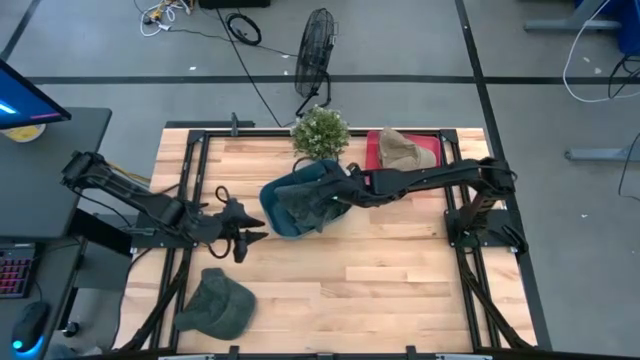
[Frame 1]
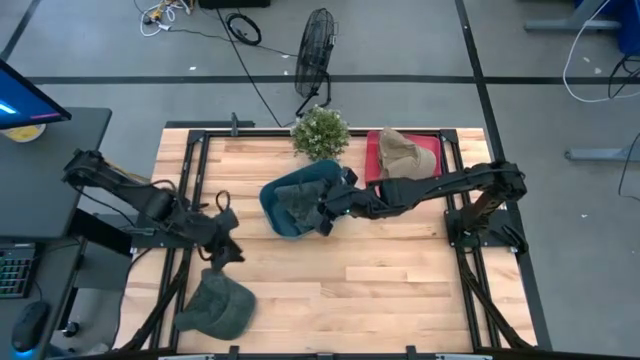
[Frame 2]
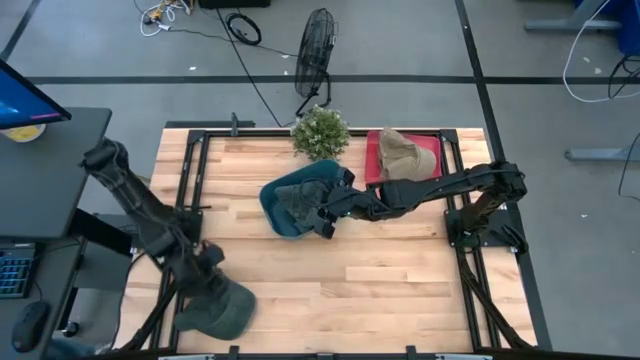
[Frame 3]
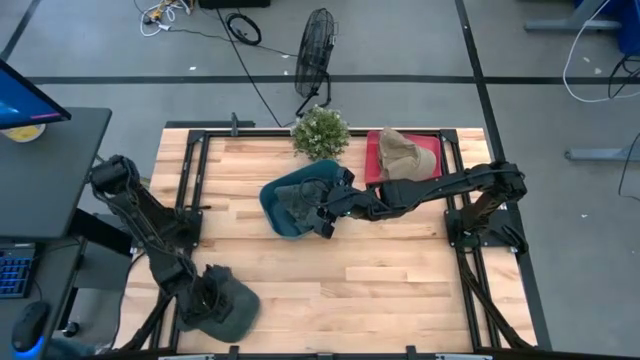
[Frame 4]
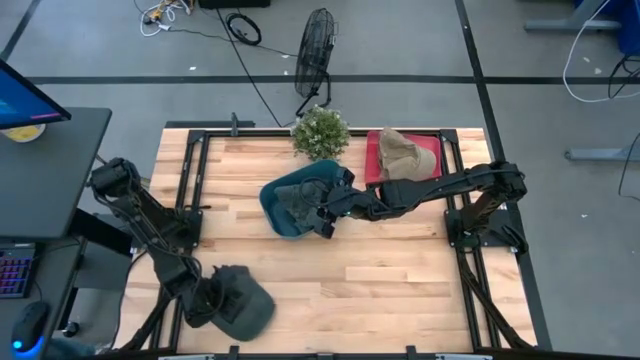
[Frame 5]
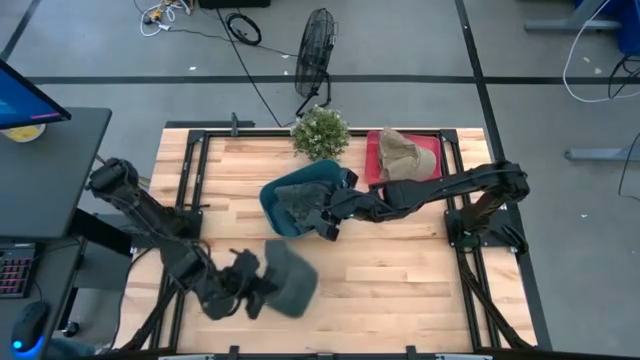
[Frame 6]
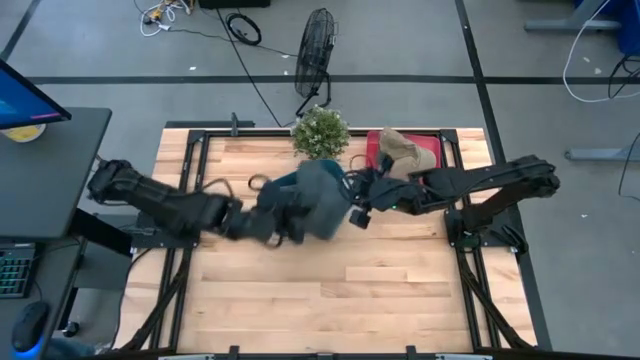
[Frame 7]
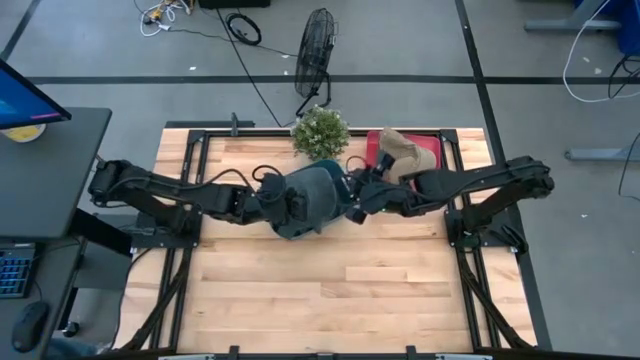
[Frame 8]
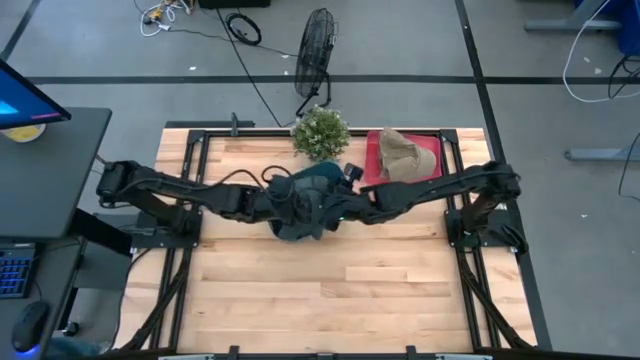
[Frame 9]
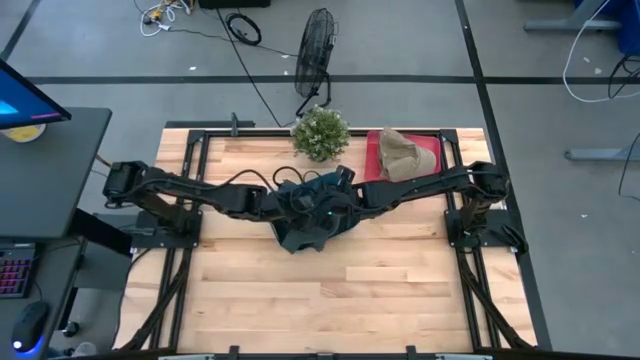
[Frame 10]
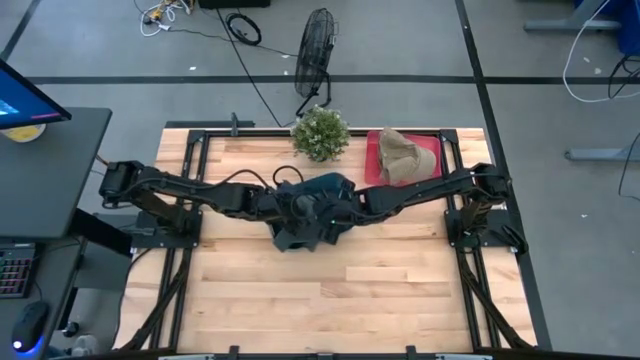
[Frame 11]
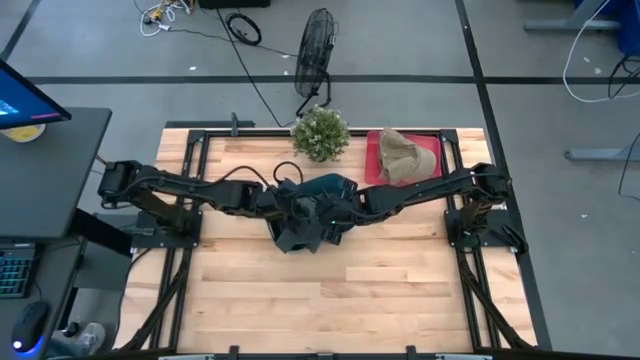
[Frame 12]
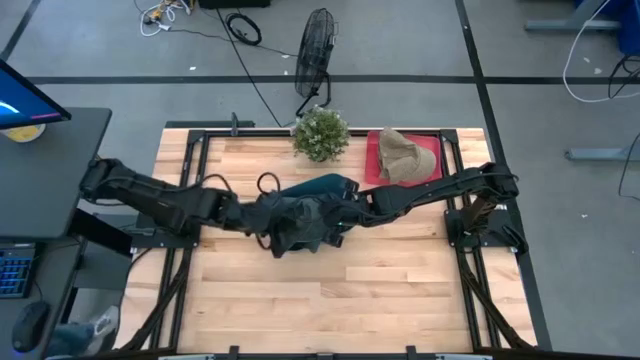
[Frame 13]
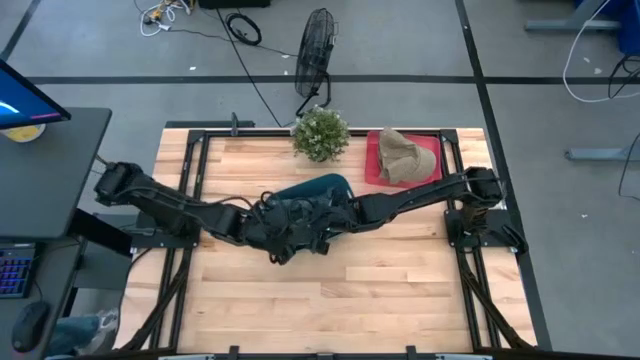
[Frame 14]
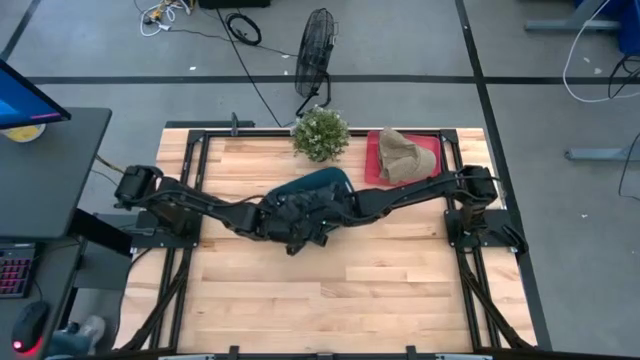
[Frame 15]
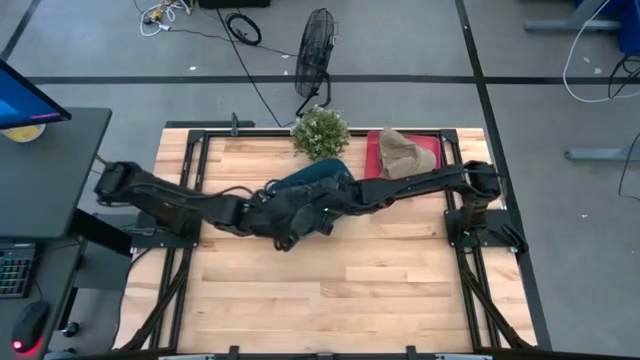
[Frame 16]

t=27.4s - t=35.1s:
Task: Pick & Place hat
Put the black cap into the blue bin

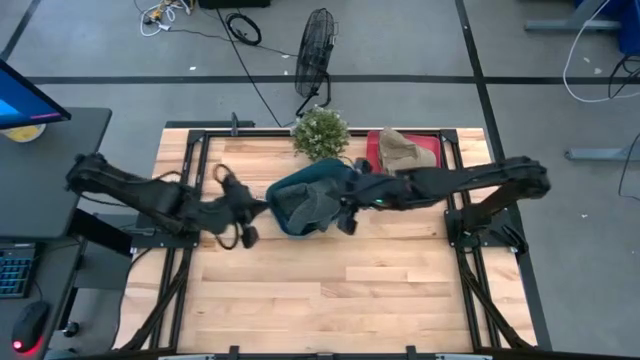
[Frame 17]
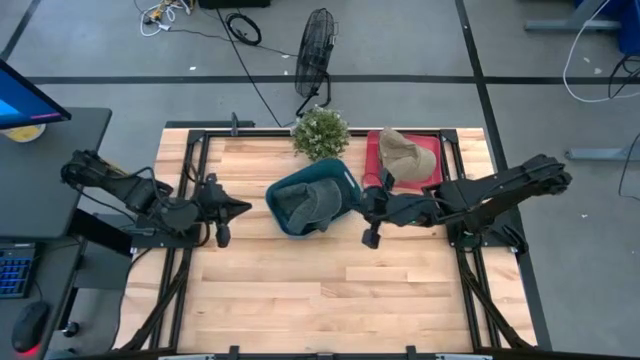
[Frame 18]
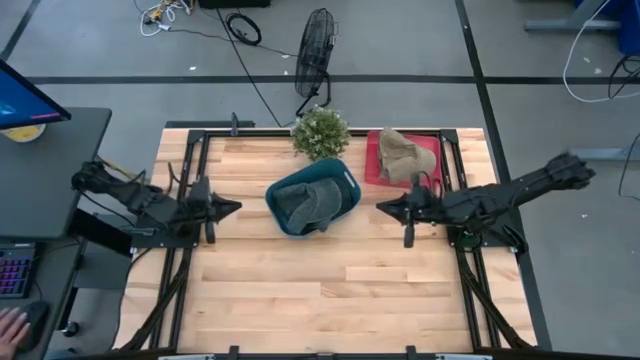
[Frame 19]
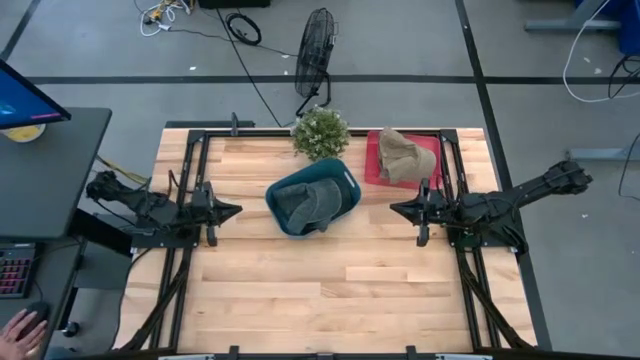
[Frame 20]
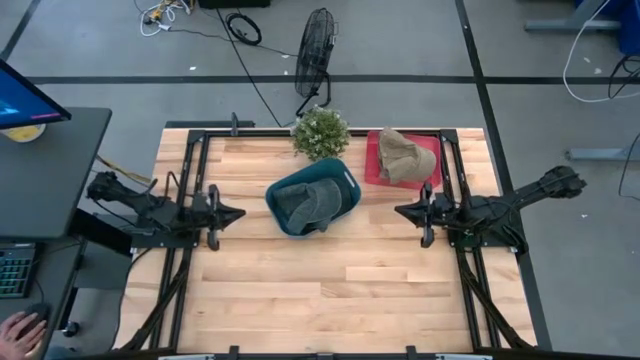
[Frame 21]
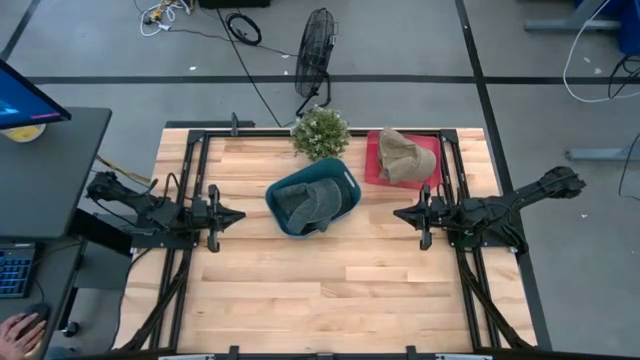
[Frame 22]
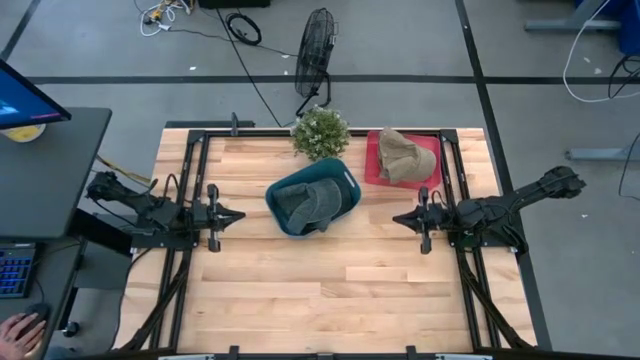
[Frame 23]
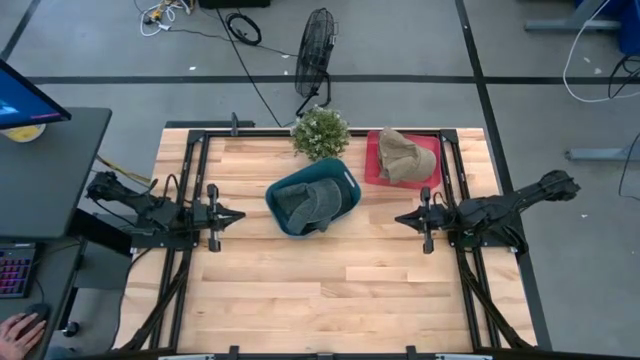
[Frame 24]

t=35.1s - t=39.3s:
Return to Home Position

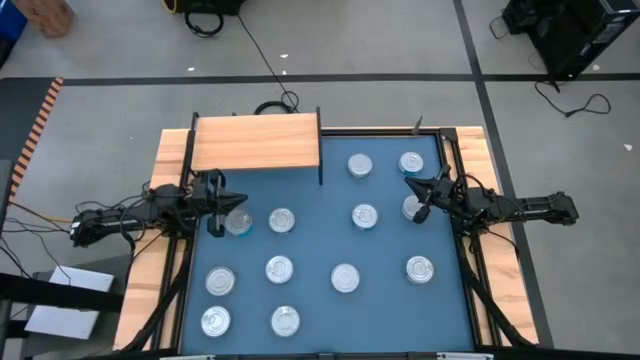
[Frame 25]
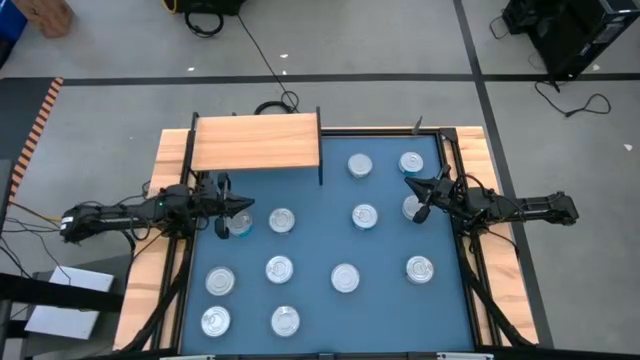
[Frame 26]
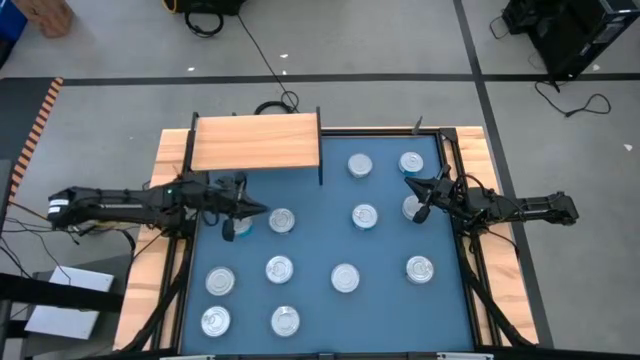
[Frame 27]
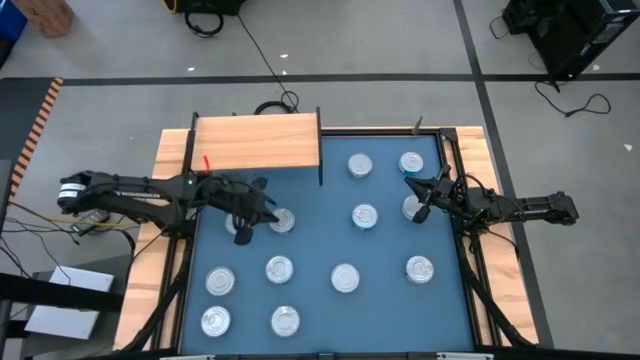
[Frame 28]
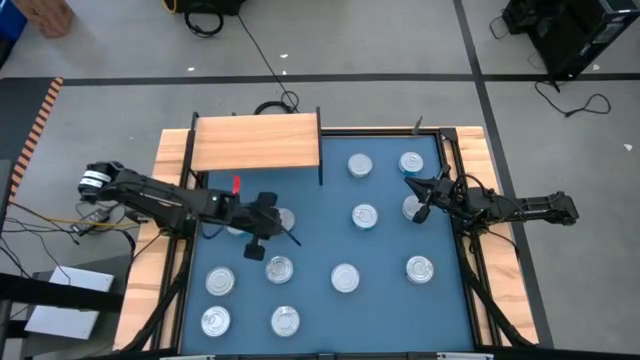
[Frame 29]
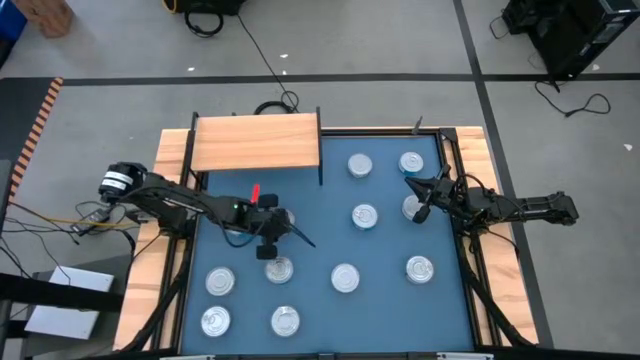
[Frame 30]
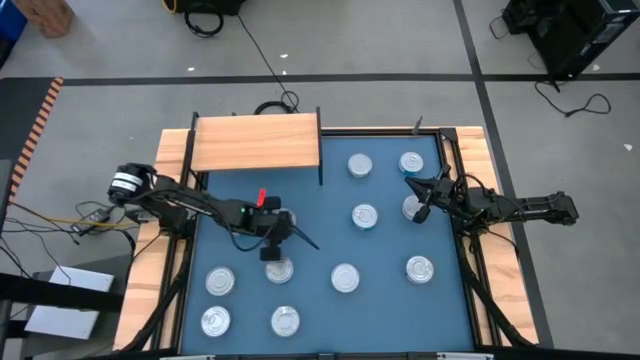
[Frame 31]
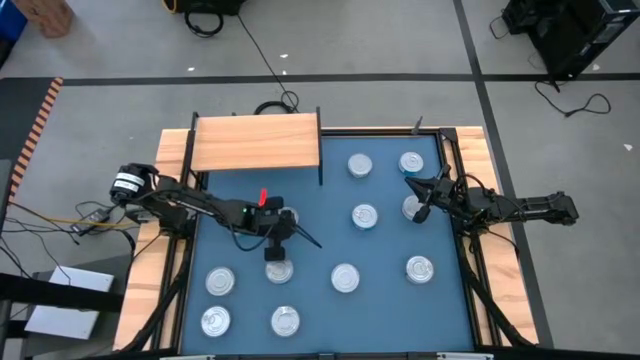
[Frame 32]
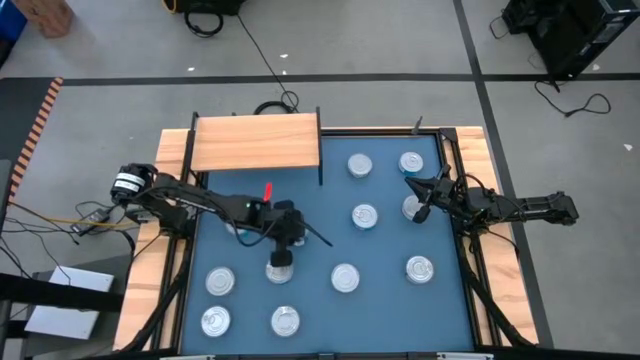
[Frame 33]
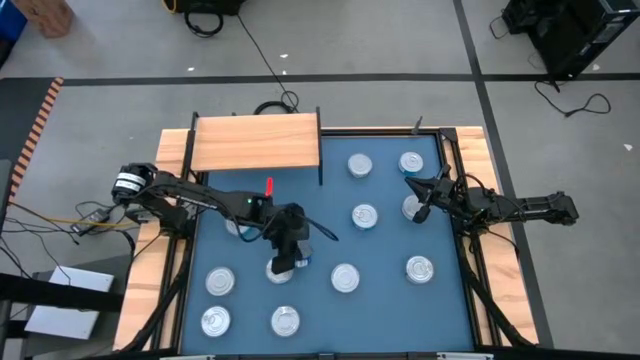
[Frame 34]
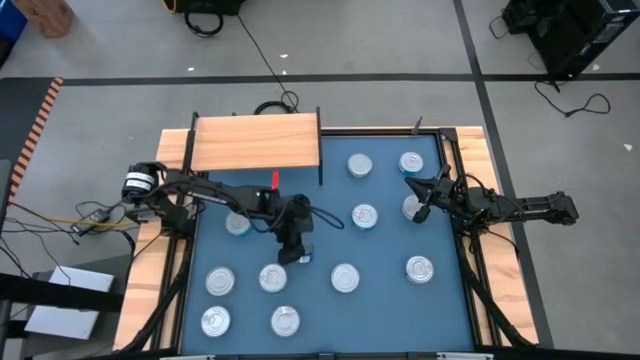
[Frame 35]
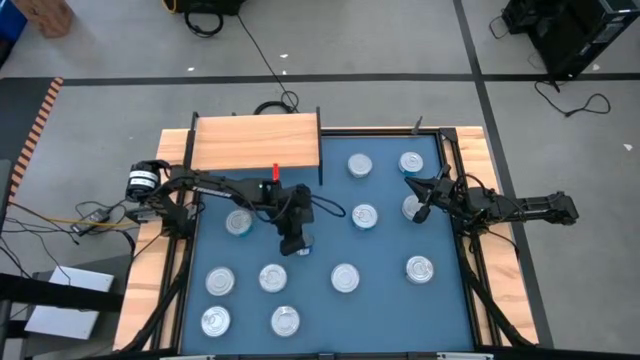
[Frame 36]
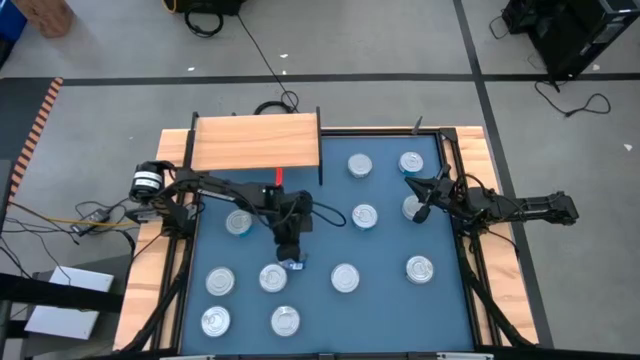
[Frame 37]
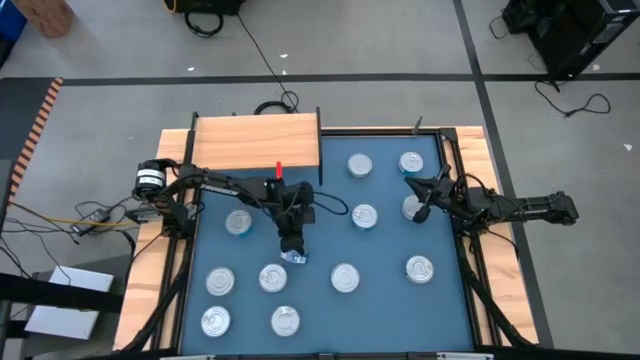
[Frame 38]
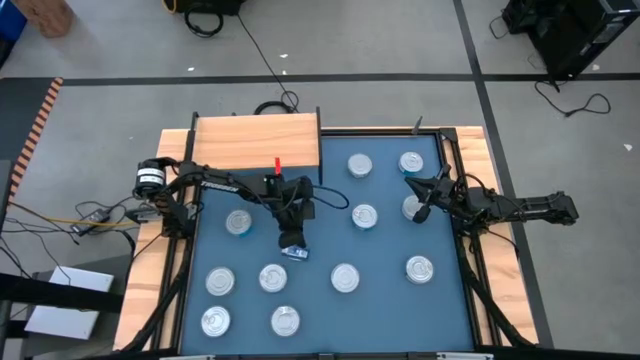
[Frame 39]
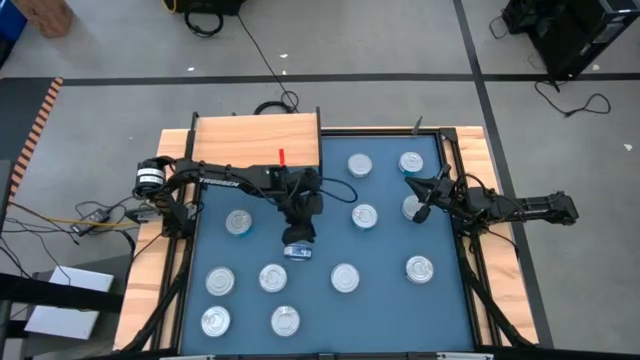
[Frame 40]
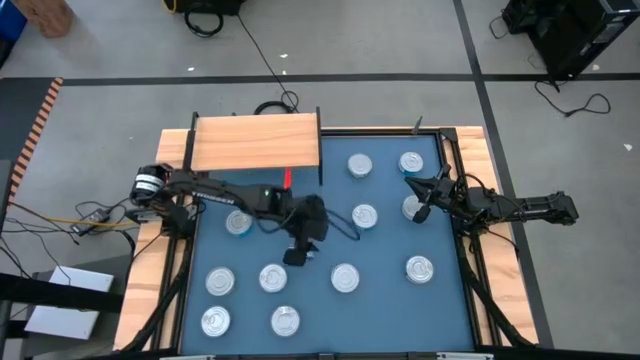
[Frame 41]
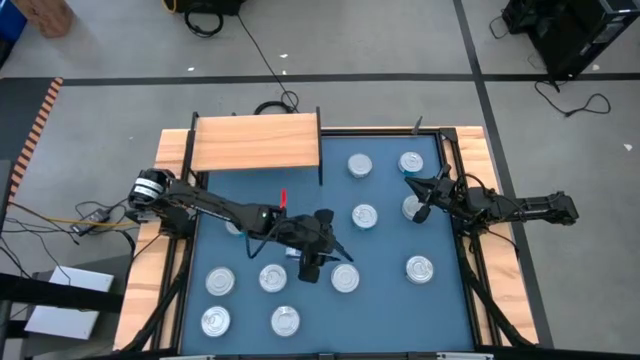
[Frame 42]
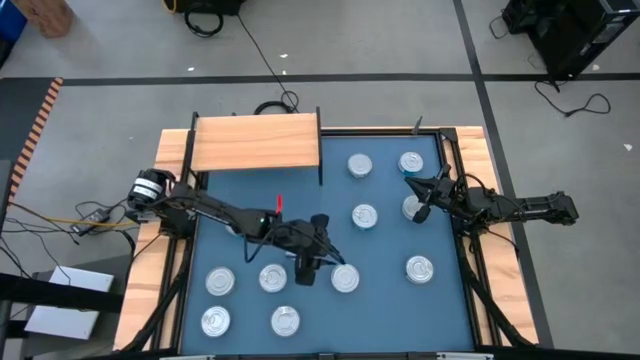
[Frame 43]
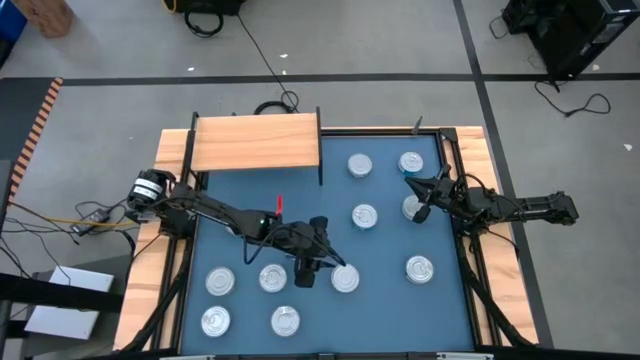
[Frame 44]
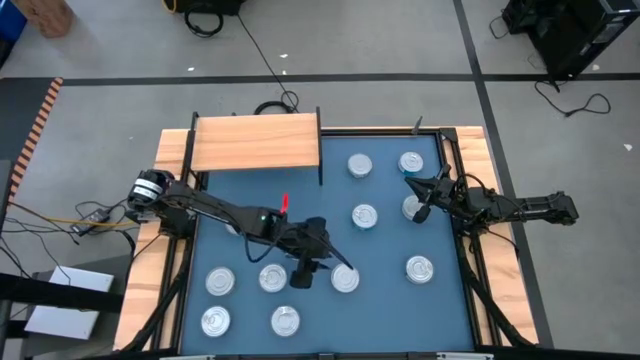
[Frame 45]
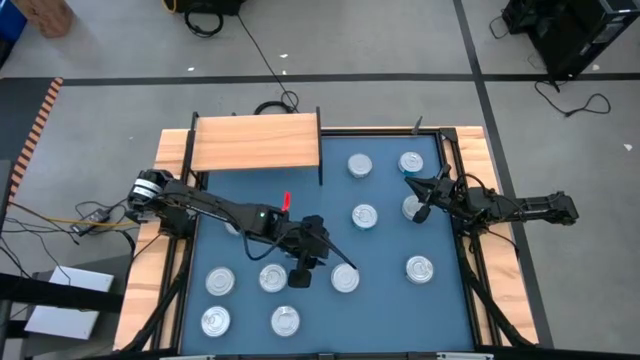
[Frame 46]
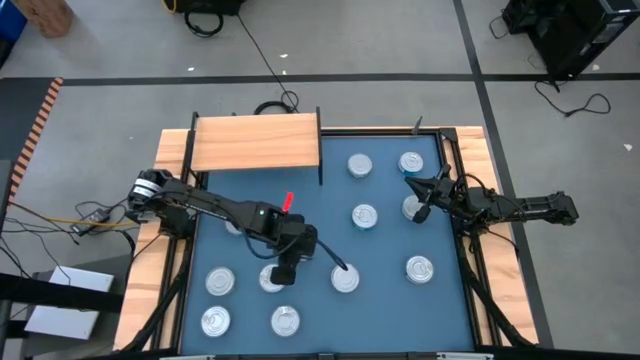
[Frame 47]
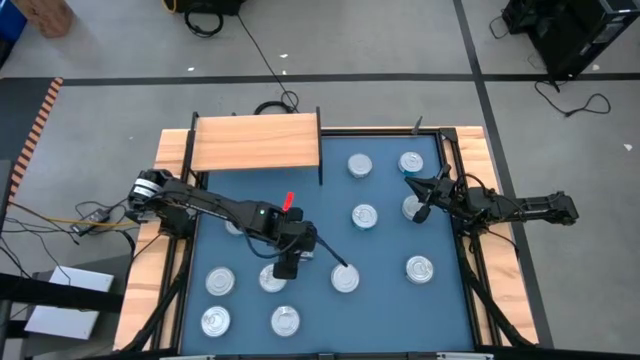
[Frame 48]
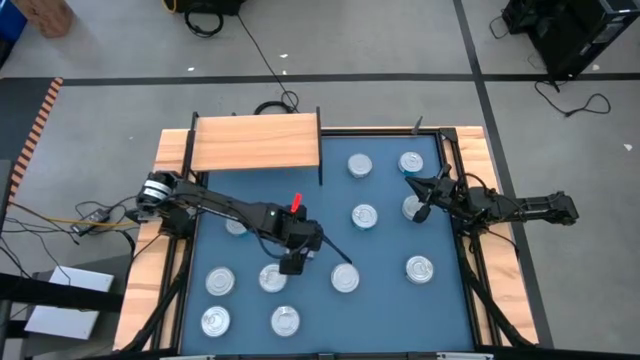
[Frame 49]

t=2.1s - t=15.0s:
Task: Stack canned seafood by type on shelf
Put the blue tuna can on the shelf
